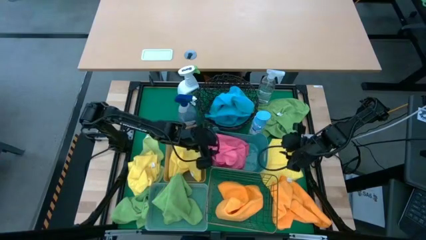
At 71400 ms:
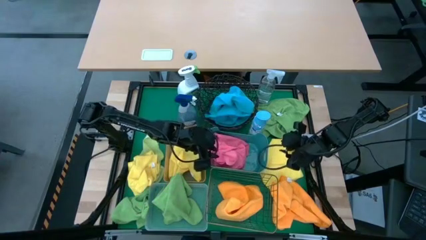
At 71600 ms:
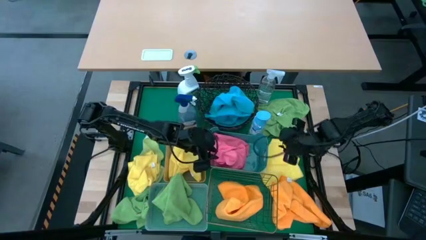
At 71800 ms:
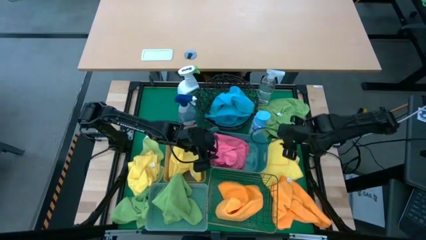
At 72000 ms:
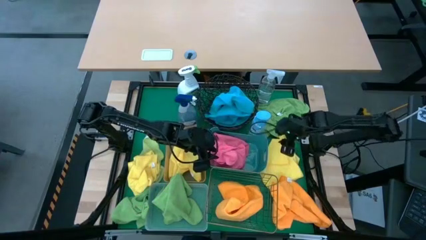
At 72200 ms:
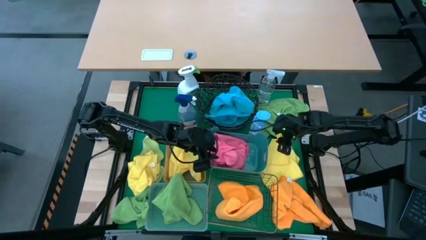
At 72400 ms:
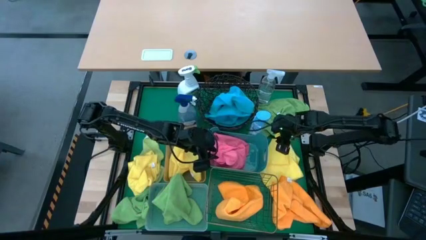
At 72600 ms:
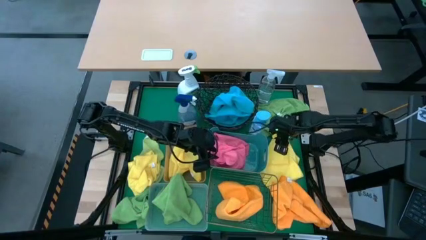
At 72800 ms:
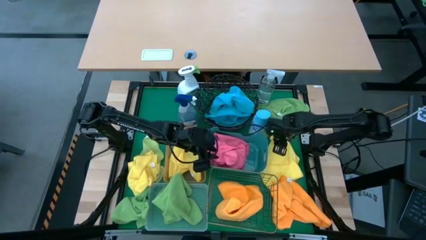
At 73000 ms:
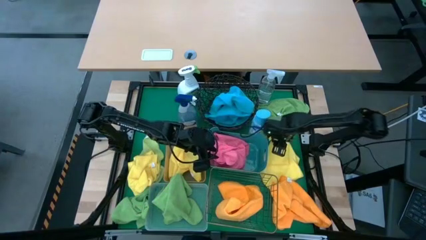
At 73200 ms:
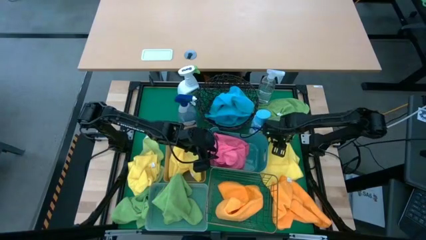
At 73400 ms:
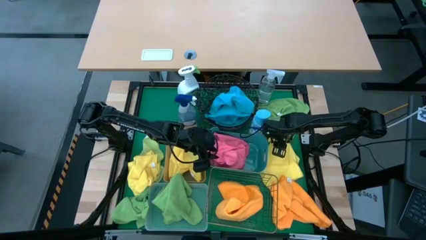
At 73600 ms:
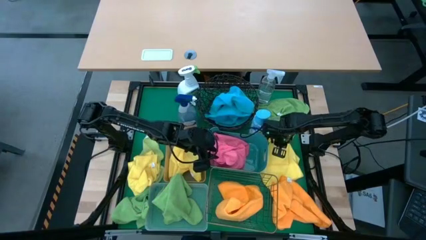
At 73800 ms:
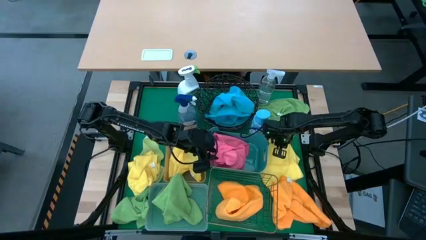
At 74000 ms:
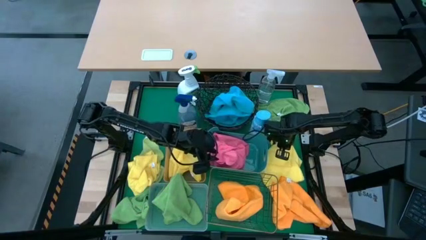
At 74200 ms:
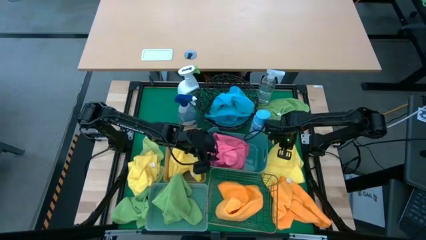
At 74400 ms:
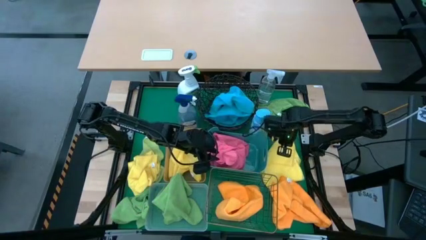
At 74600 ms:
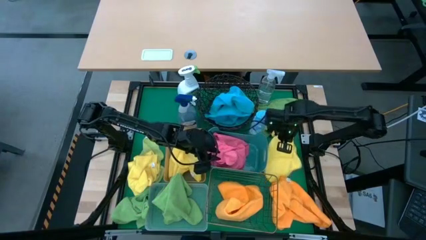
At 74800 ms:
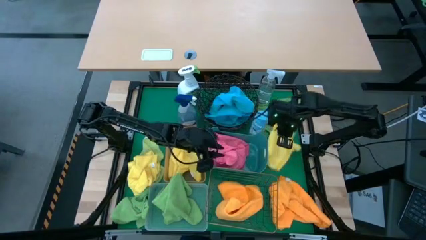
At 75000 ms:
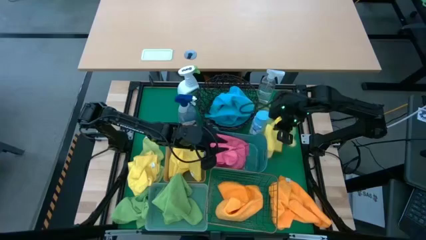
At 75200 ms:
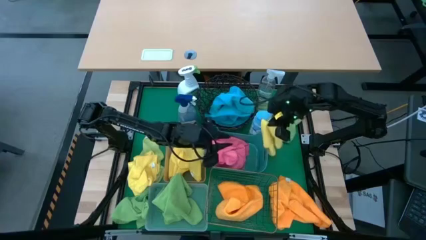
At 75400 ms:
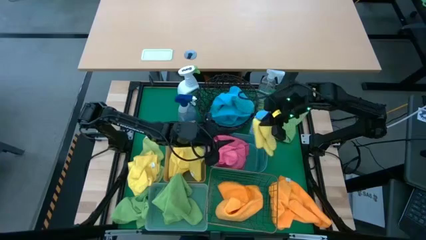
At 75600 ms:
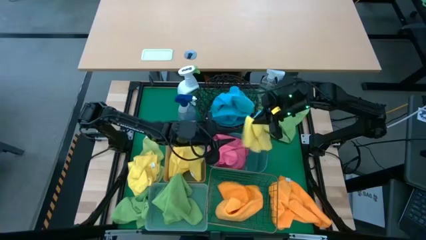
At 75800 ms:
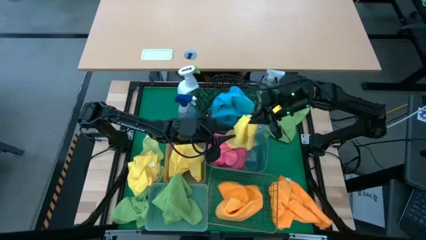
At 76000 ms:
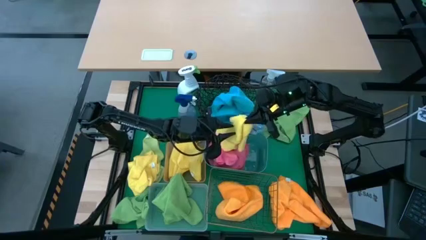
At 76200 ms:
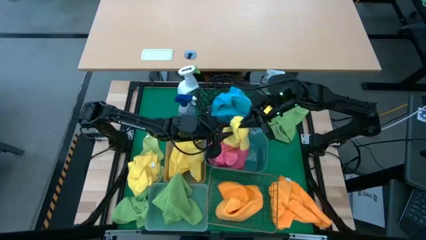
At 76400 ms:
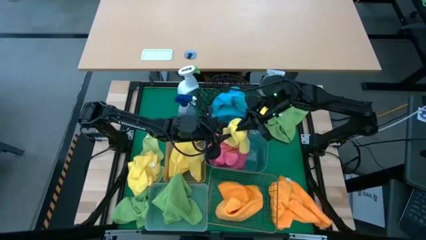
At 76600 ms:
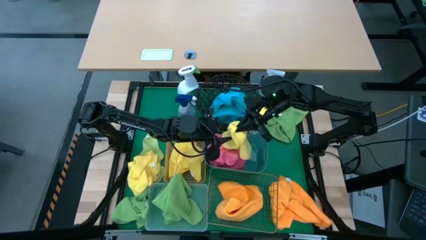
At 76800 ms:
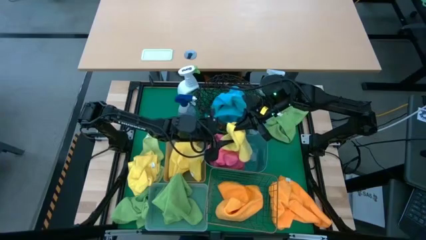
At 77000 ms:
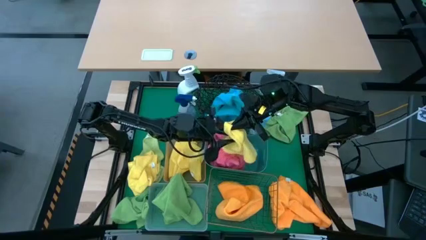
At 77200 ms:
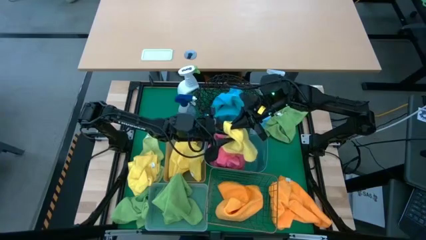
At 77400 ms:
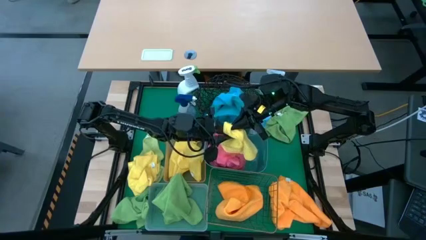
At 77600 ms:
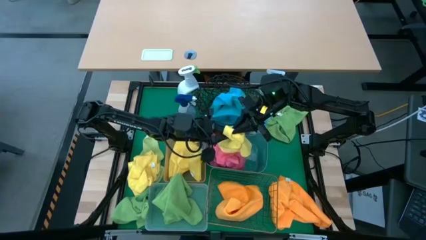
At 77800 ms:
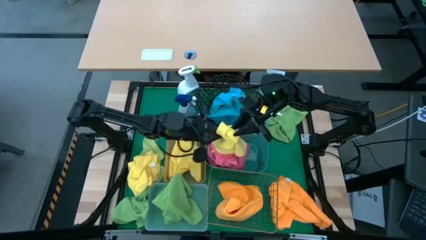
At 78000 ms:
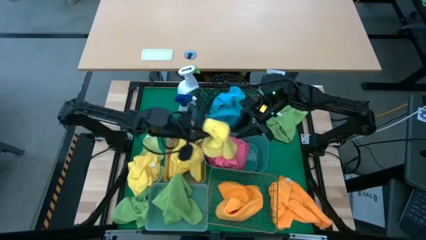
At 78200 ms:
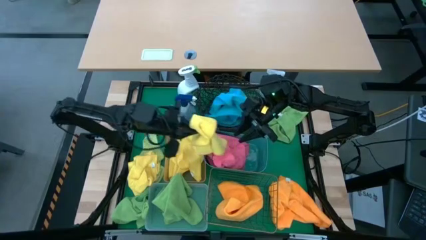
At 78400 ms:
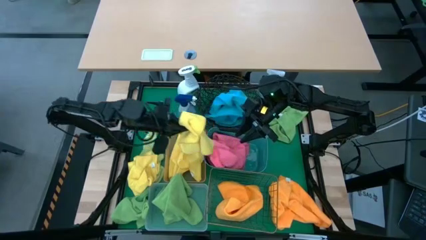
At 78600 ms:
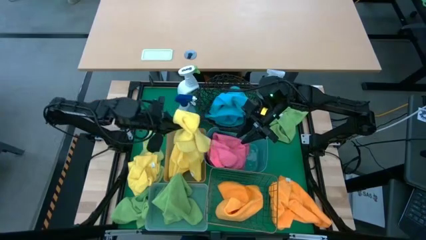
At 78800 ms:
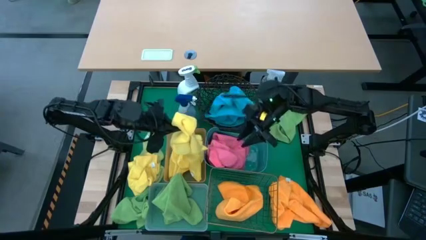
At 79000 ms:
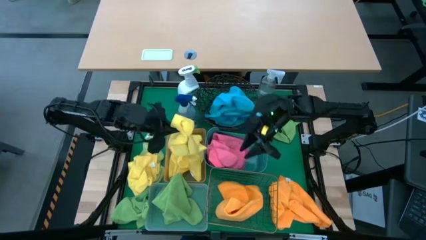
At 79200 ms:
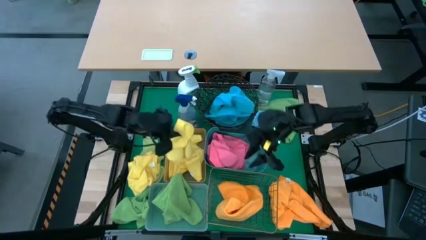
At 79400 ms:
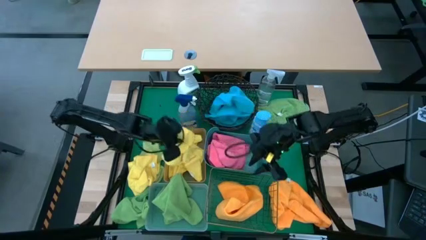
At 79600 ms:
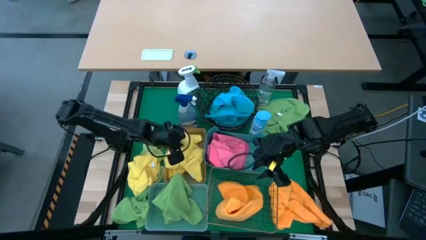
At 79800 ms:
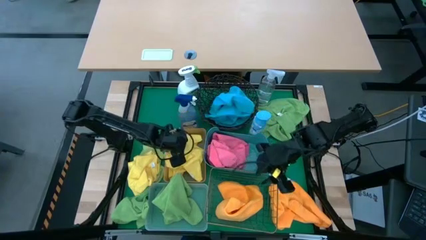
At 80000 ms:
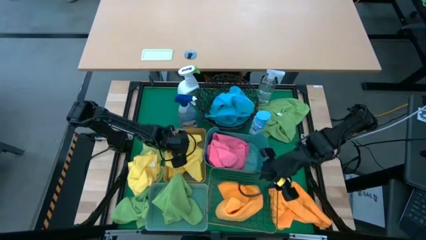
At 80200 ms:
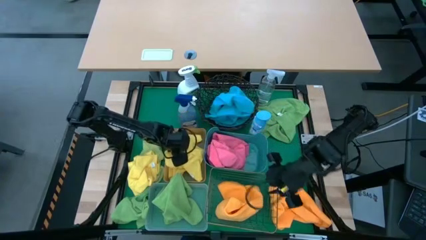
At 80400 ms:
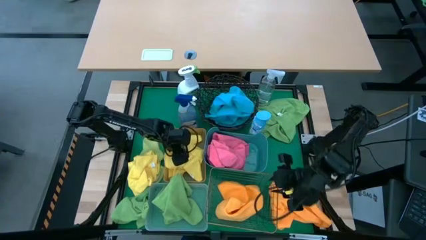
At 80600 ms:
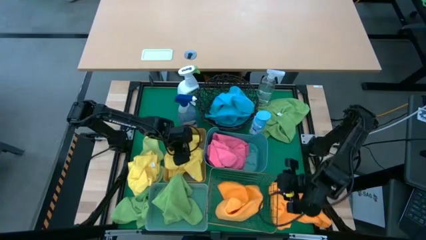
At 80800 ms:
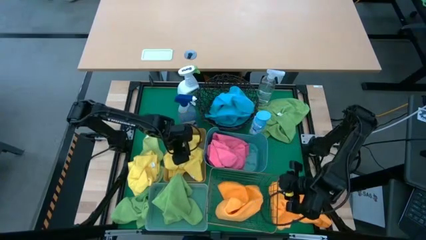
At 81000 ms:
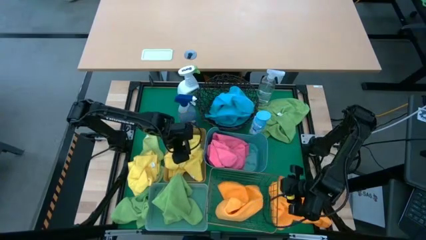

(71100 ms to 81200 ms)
Task: Sort microfiber towel by color & place in baskets
Put the right yellow towel into the orange bin

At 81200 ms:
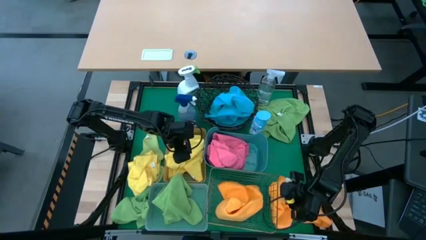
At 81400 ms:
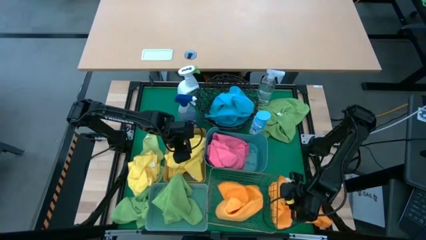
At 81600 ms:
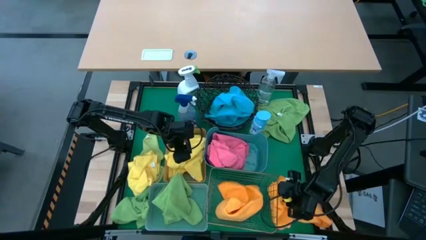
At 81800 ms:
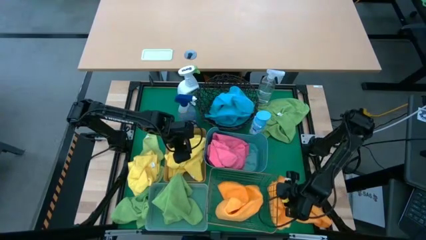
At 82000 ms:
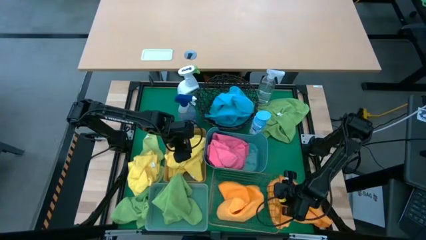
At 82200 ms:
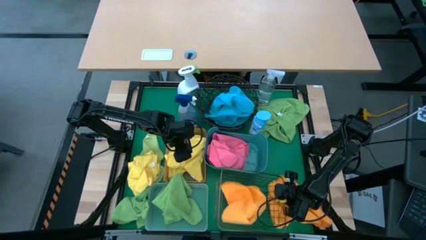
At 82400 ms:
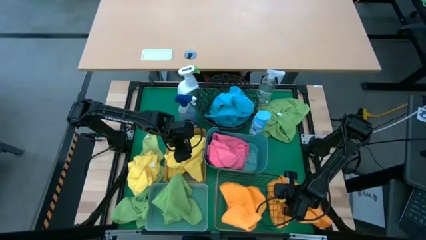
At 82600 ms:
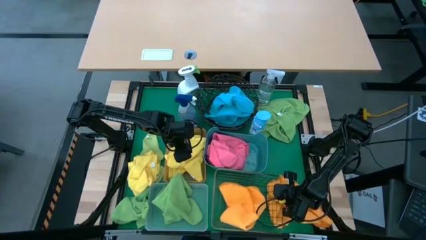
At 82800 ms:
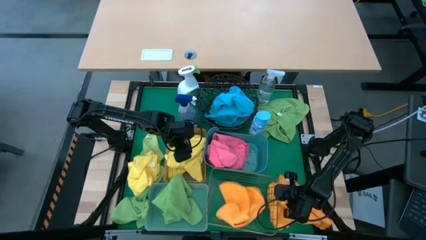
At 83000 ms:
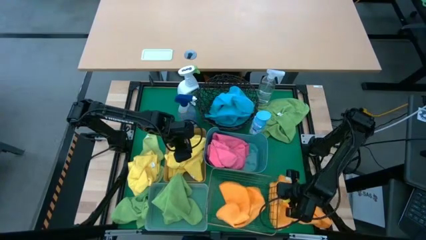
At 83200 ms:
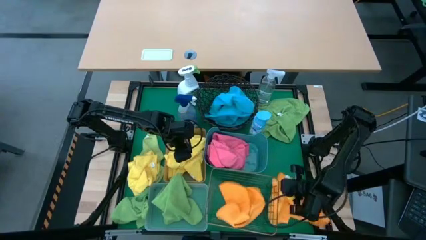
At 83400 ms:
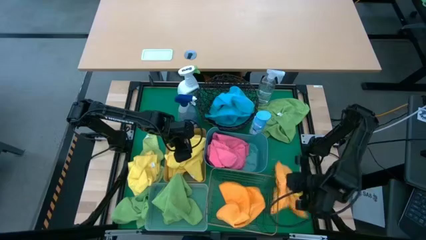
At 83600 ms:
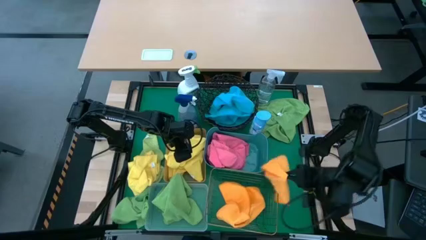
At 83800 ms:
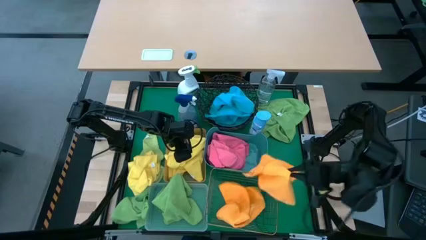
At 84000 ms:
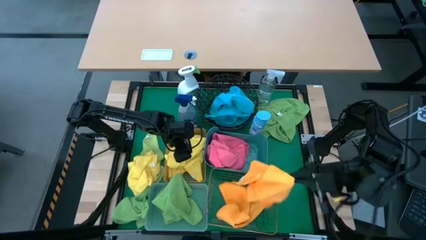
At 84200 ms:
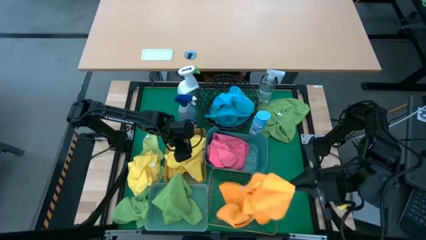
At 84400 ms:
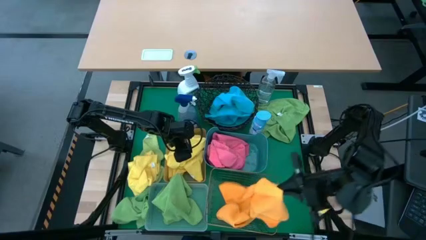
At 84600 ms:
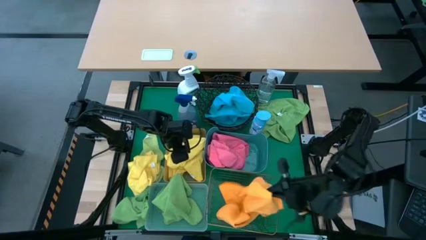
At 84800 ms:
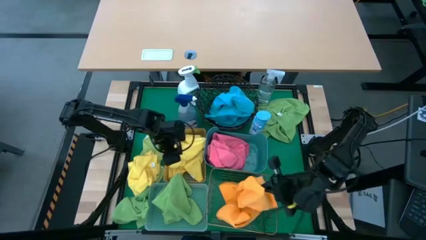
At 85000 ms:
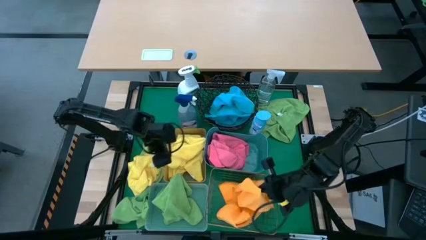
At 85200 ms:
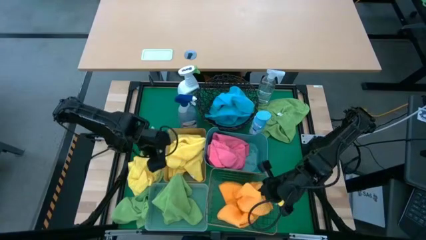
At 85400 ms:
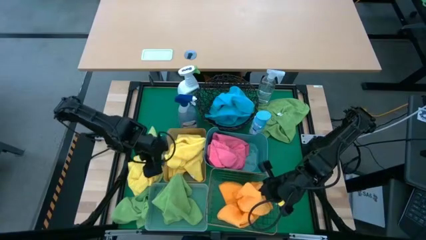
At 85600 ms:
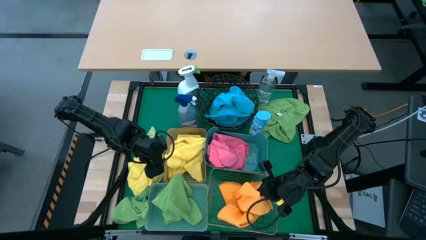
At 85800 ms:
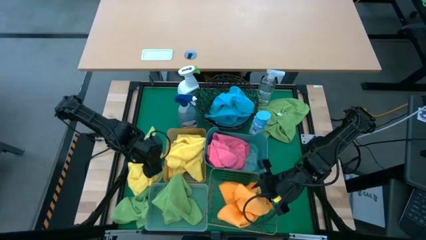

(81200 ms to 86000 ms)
Put the orange towel into the gold rectangular wire basket
